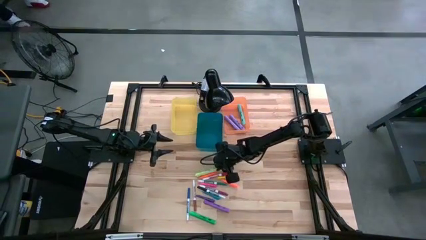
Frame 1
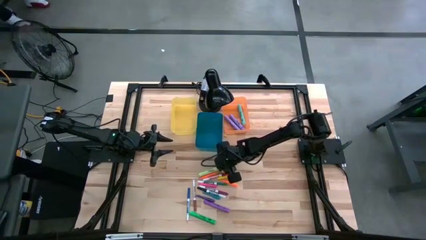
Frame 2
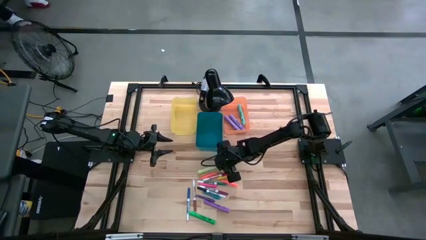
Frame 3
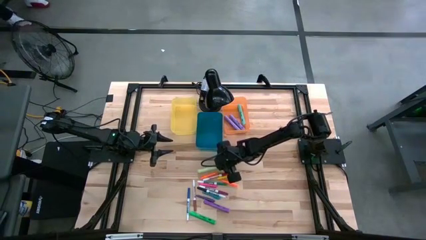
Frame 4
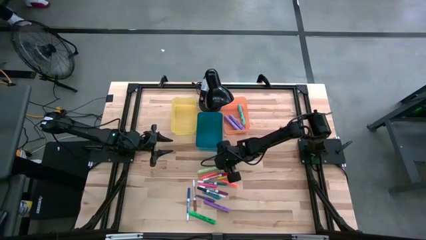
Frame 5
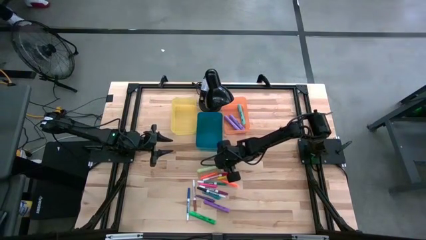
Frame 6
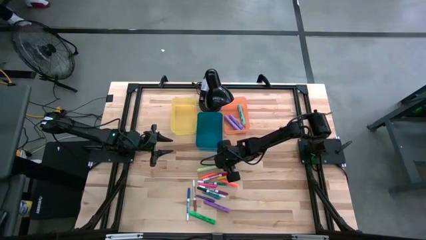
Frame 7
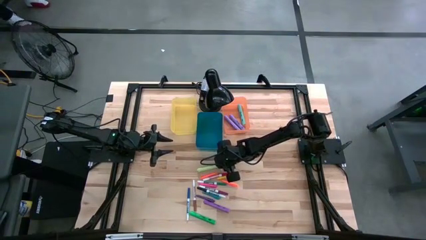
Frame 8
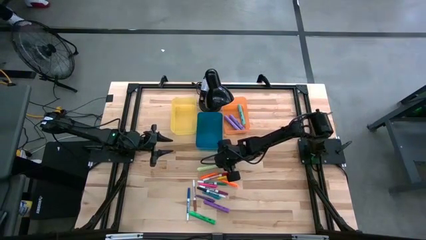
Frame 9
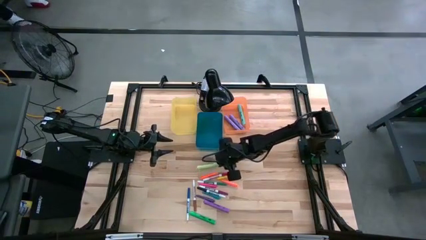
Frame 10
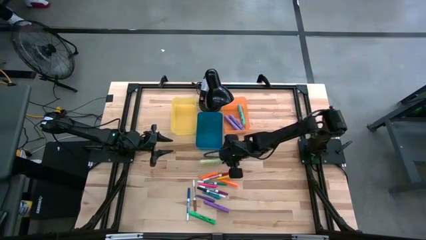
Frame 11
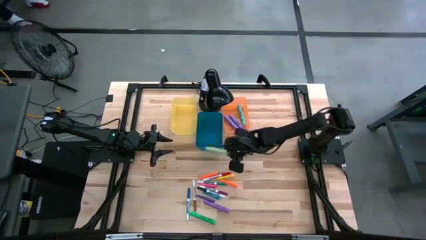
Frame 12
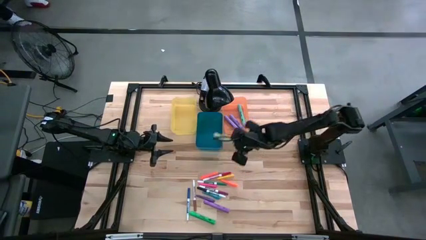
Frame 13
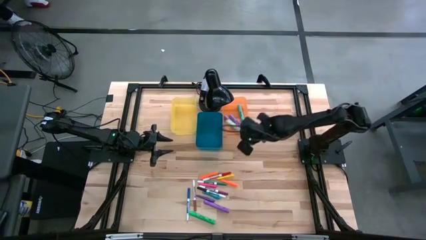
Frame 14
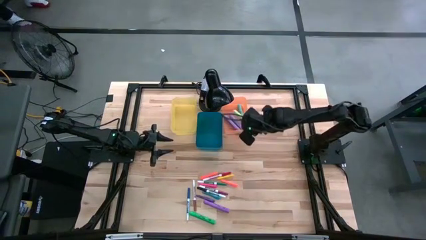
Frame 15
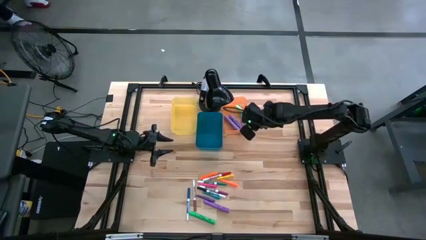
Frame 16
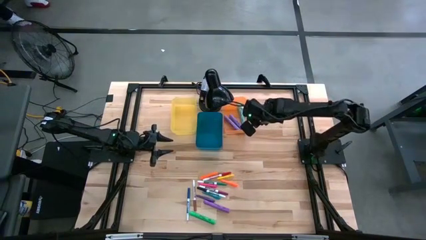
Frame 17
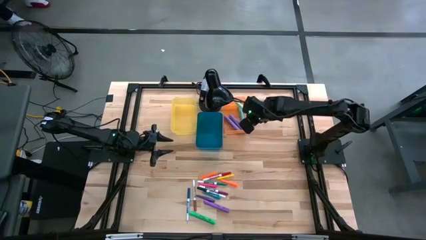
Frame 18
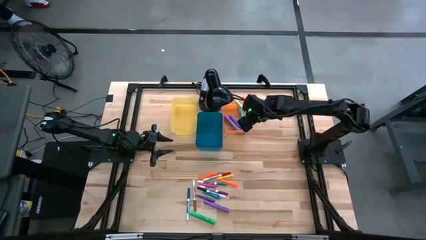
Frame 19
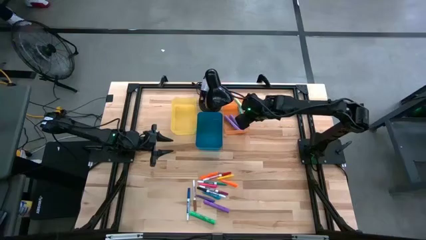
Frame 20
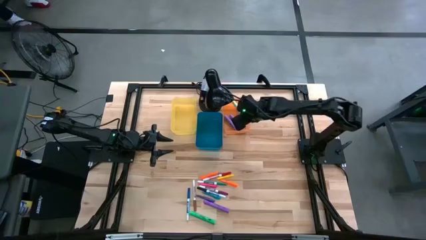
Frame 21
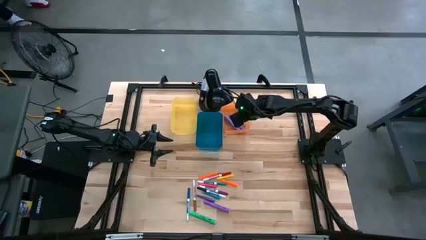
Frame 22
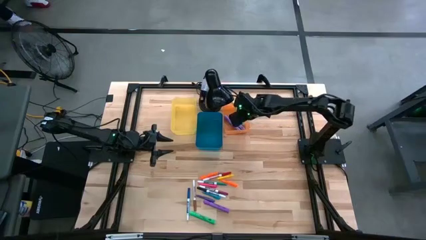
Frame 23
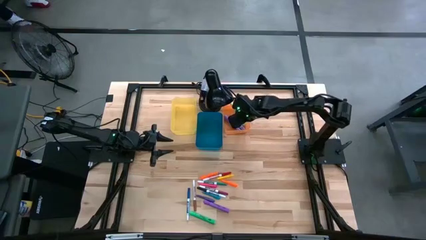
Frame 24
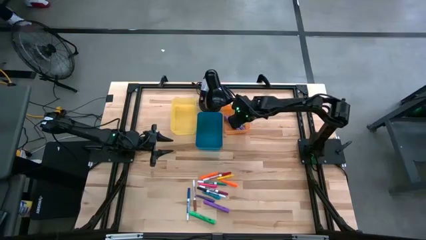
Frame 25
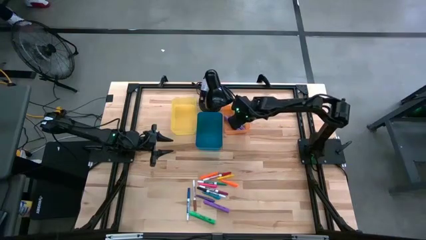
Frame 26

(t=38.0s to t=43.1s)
Task: Pick & Place Markers
Put the light green highlighter into the orange bin

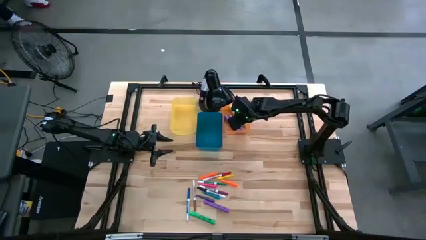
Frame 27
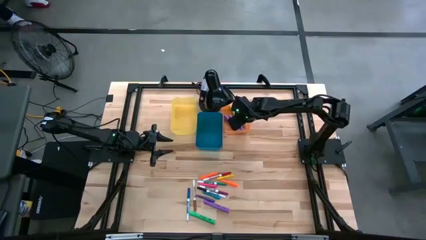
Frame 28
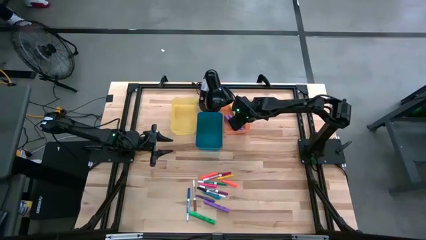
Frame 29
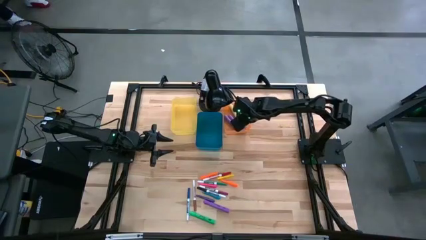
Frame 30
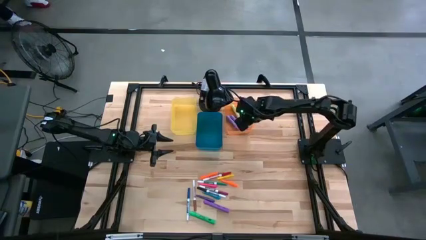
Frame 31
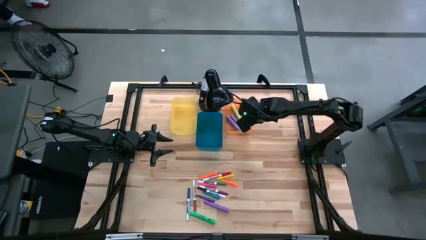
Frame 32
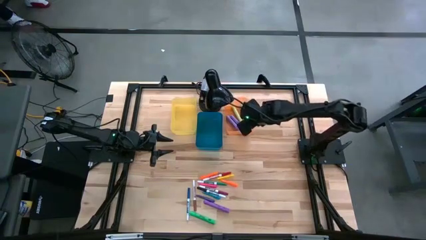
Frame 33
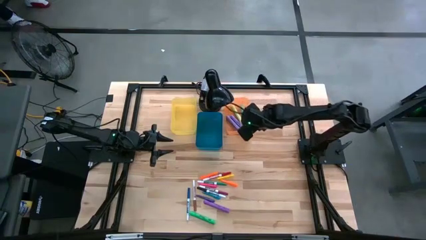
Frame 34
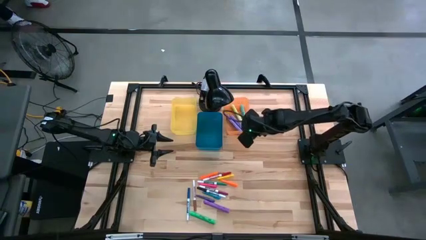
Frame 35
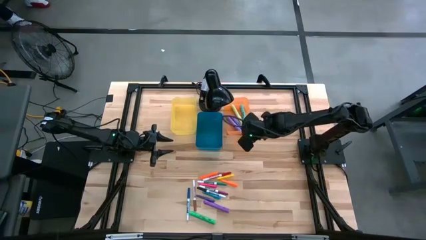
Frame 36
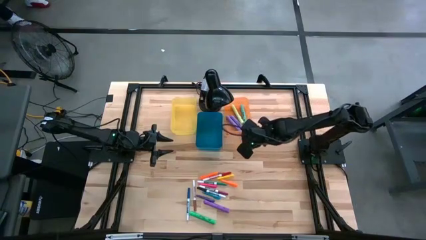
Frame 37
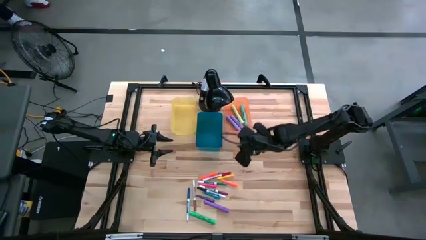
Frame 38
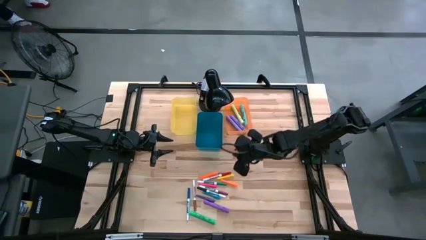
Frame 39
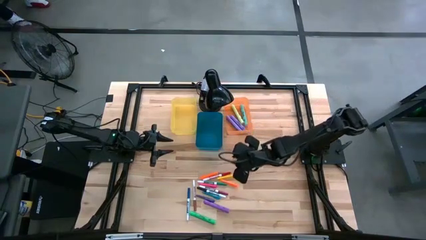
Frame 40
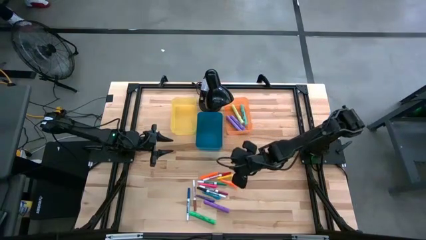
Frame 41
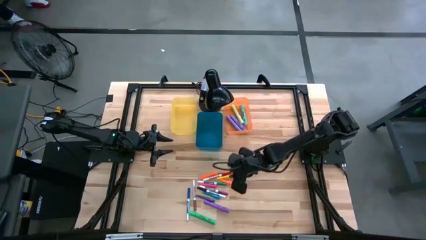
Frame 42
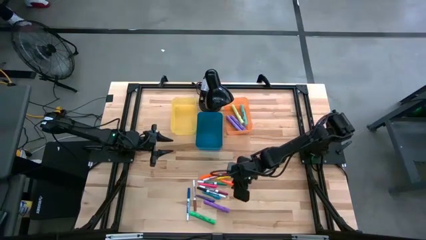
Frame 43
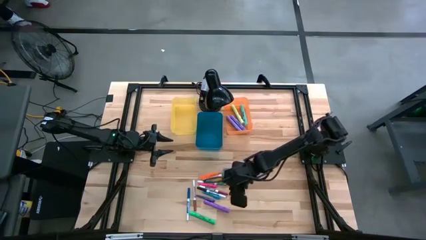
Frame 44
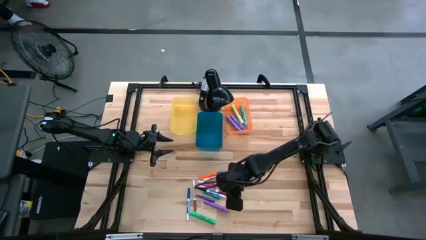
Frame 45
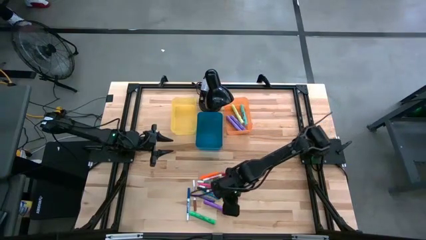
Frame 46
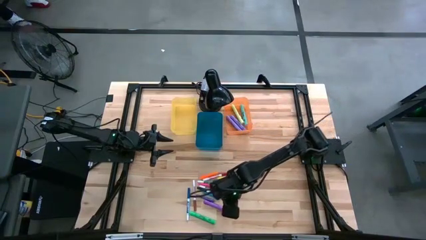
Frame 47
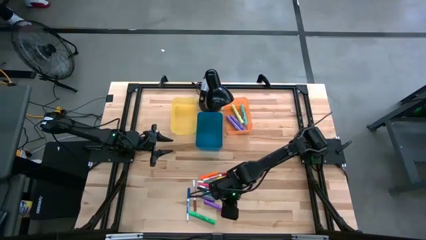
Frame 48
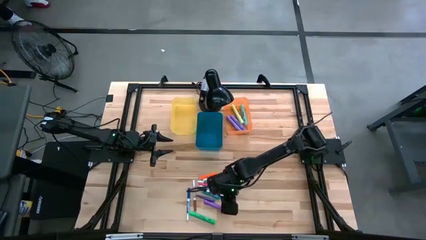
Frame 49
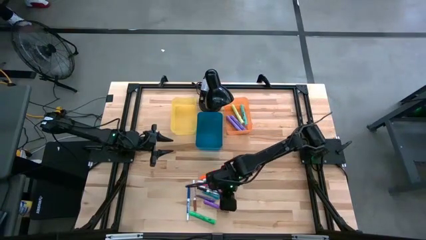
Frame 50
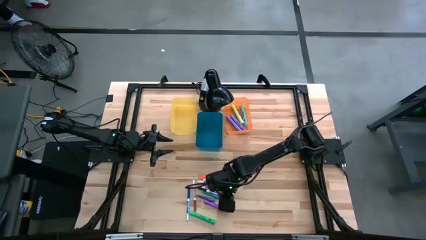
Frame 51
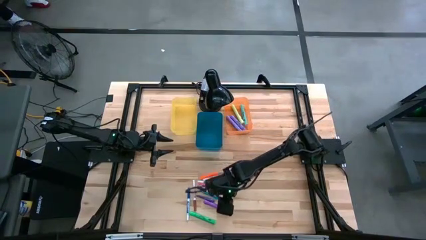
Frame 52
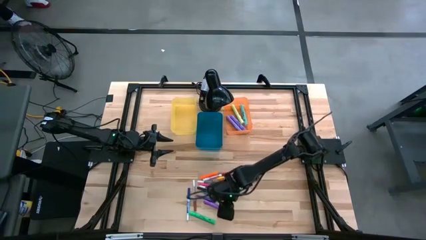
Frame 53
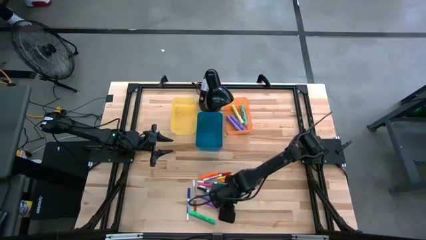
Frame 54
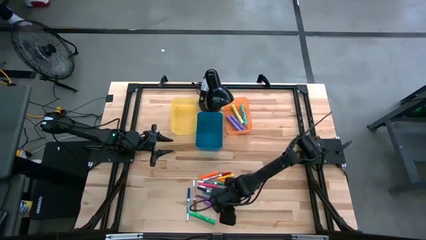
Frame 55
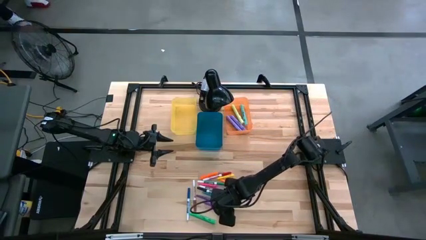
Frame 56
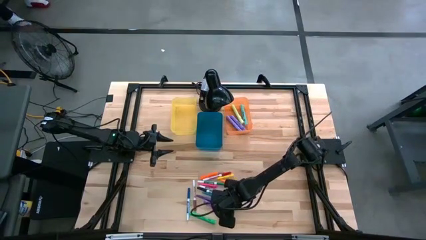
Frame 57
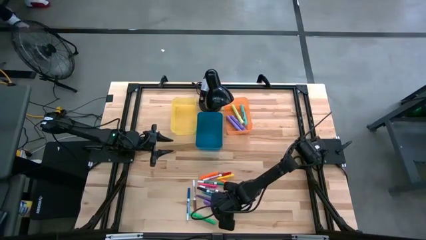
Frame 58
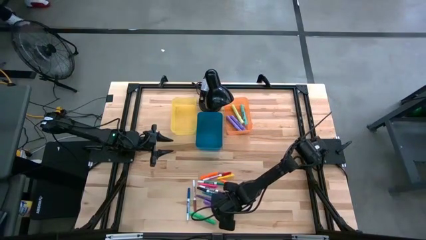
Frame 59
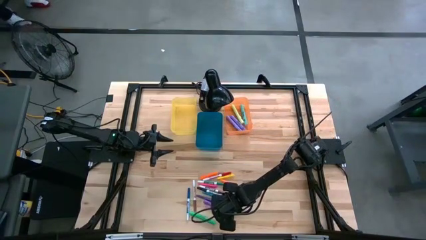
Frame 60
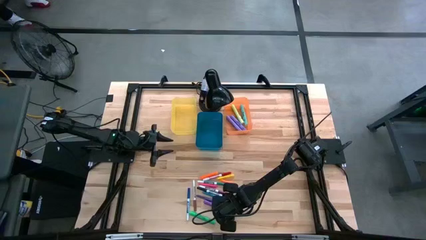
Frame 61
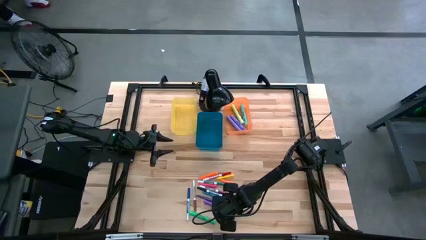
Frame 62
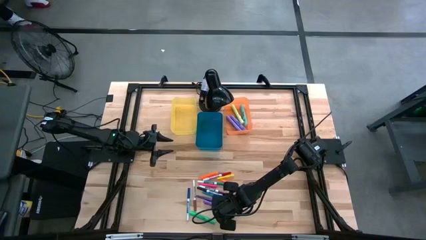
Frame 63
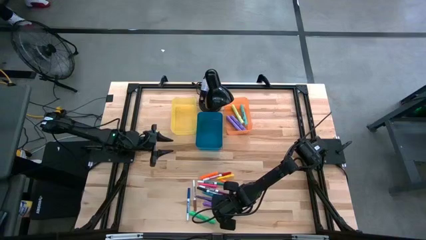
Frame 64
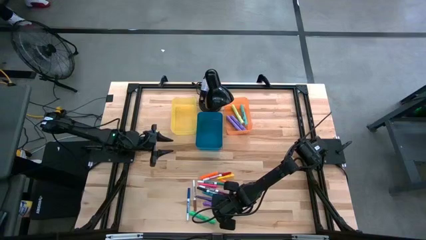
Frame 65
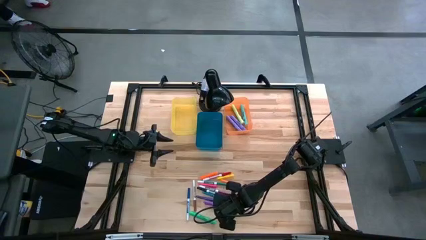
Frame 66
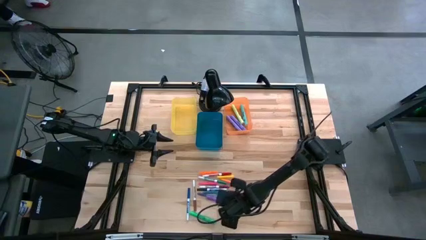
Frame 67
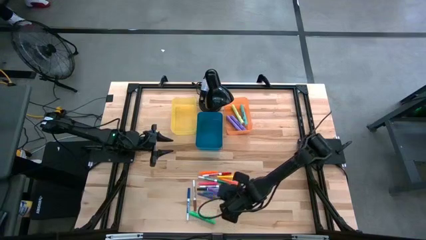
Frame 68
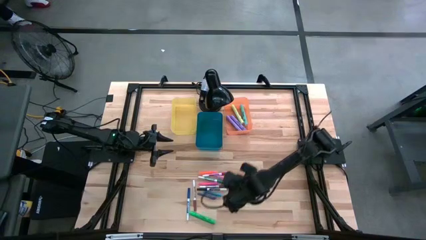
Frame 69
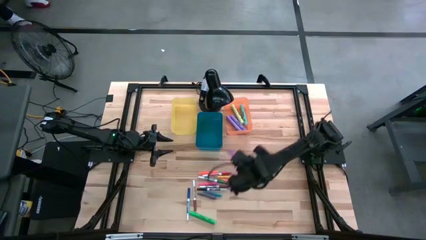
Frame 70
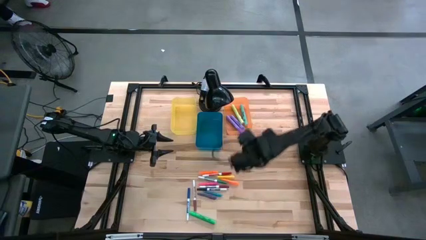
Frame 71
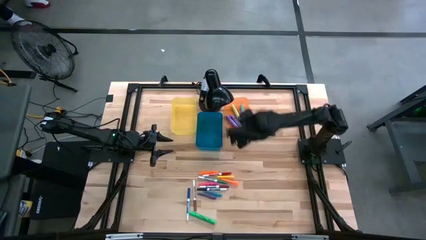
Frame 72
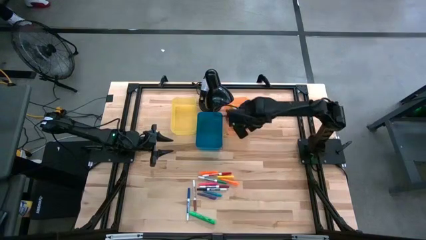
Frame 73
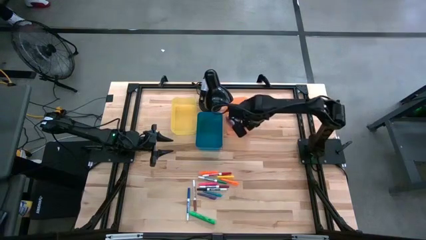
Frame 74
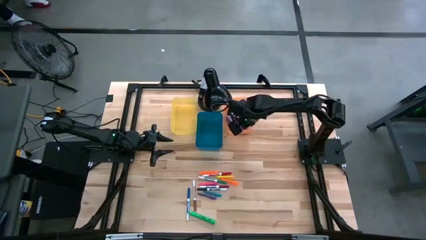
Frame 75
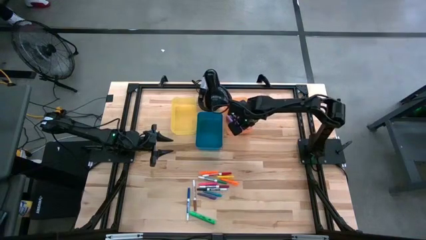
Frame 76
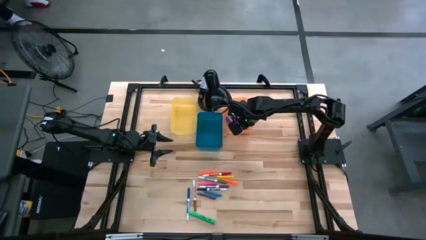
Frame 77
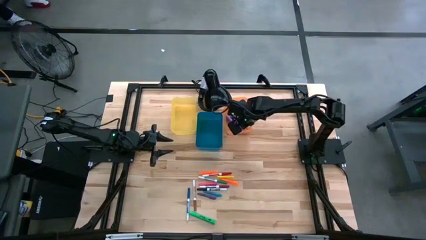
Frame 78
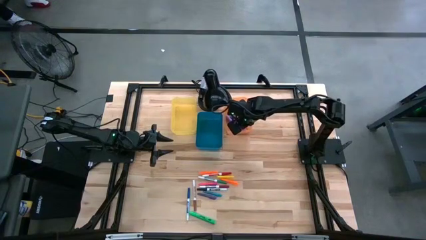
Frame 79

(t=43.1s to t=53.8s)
Put the purple highlighter into the orange bin
